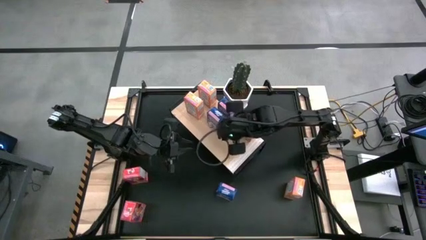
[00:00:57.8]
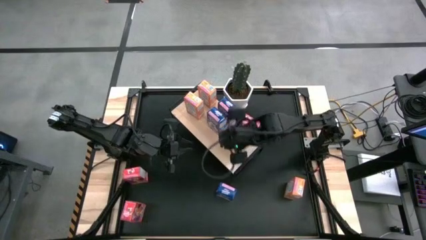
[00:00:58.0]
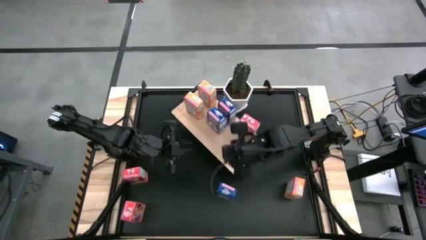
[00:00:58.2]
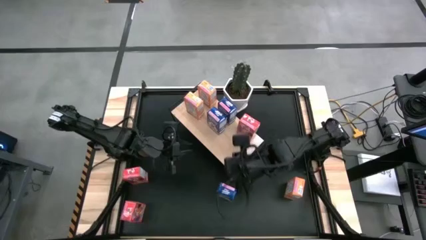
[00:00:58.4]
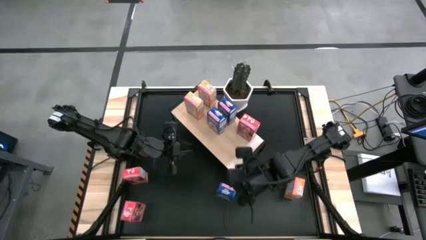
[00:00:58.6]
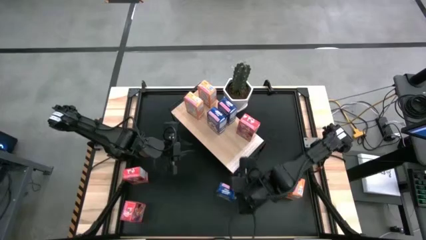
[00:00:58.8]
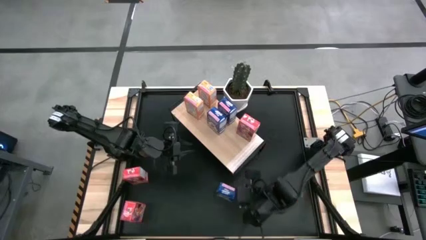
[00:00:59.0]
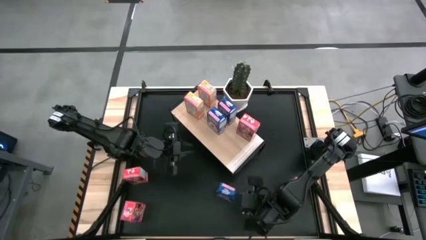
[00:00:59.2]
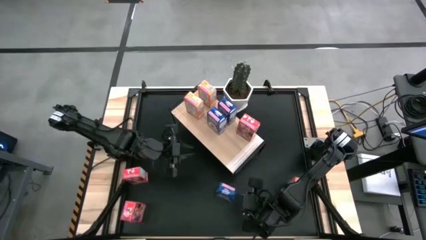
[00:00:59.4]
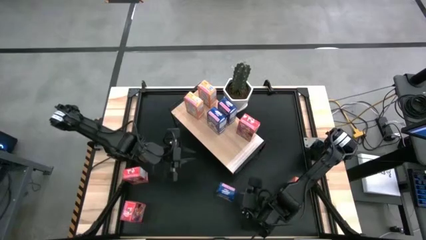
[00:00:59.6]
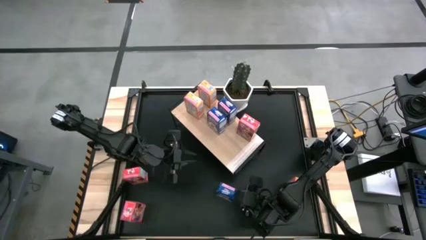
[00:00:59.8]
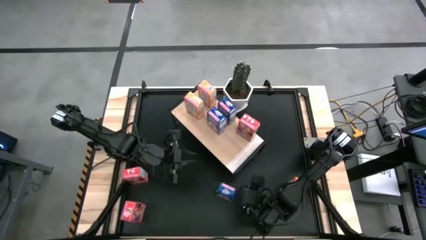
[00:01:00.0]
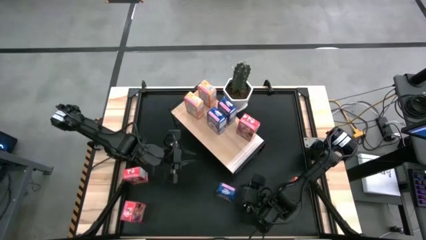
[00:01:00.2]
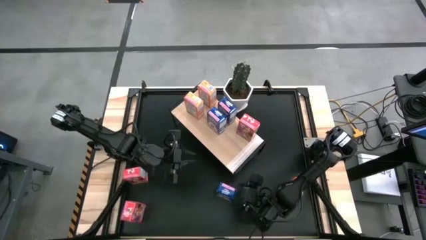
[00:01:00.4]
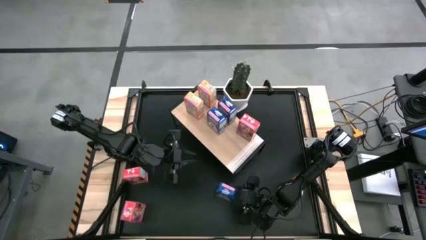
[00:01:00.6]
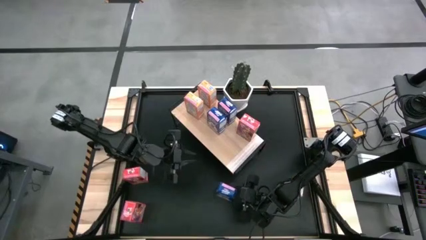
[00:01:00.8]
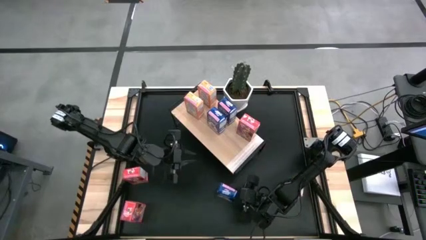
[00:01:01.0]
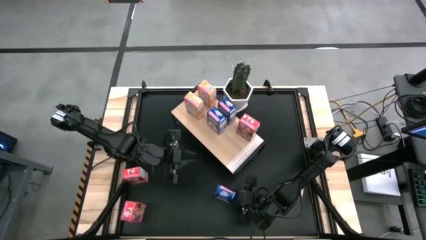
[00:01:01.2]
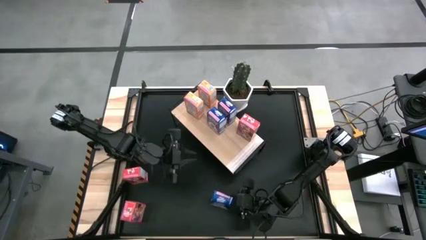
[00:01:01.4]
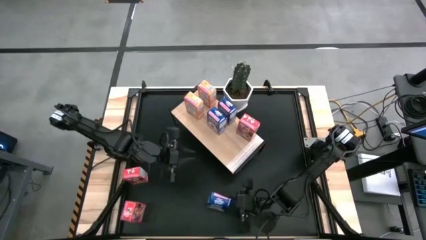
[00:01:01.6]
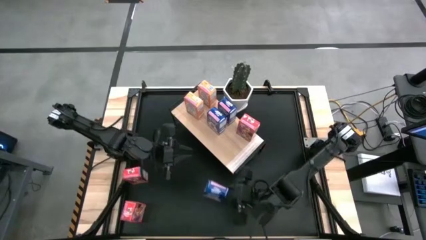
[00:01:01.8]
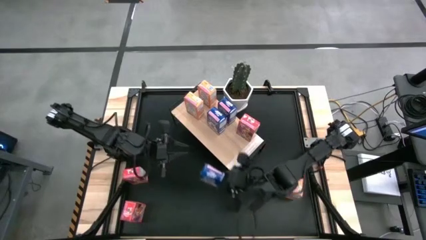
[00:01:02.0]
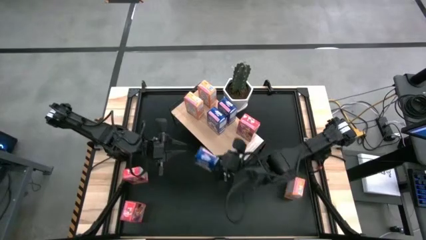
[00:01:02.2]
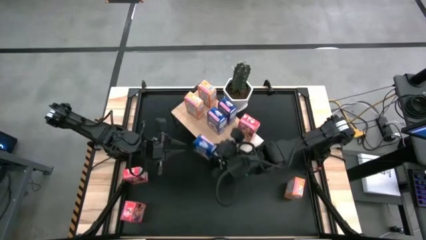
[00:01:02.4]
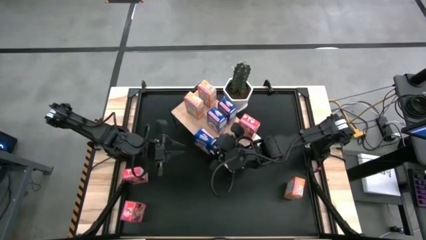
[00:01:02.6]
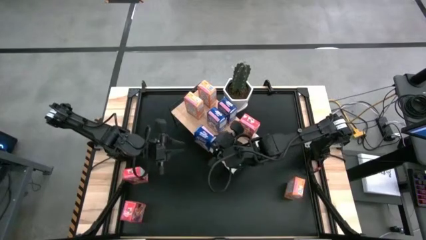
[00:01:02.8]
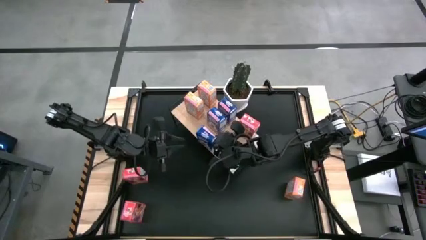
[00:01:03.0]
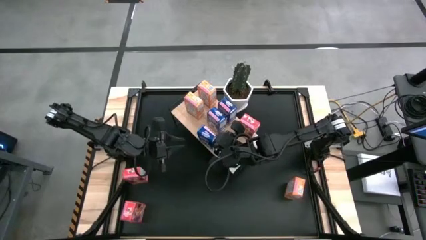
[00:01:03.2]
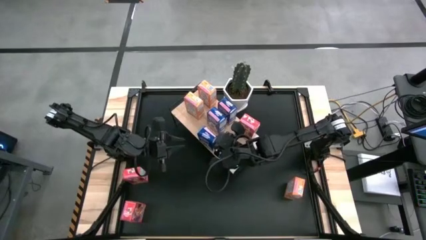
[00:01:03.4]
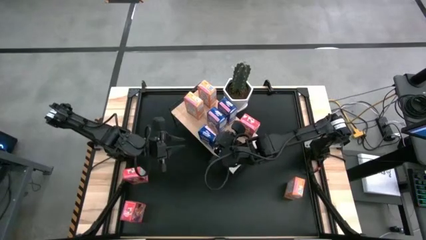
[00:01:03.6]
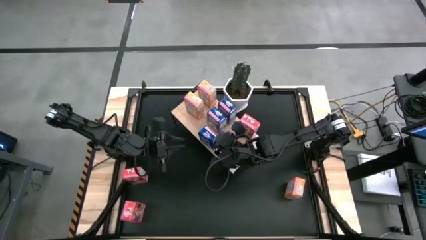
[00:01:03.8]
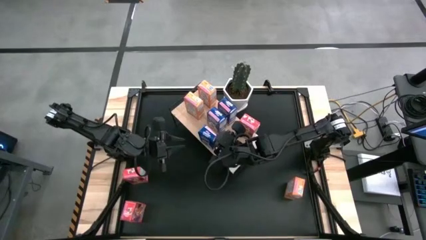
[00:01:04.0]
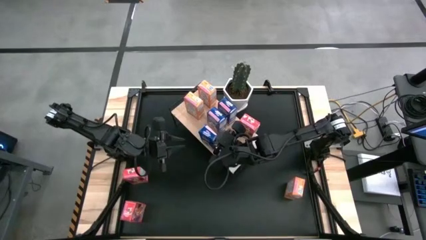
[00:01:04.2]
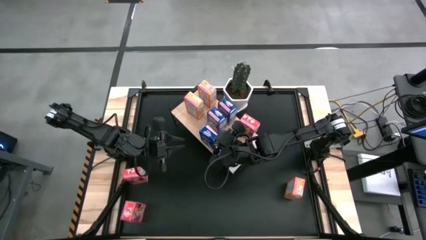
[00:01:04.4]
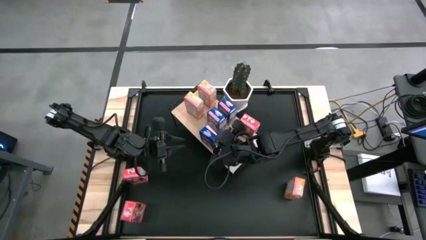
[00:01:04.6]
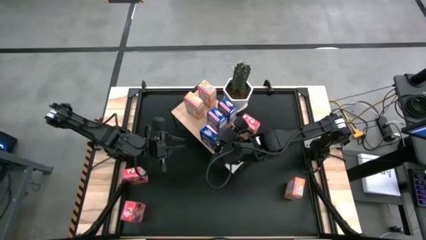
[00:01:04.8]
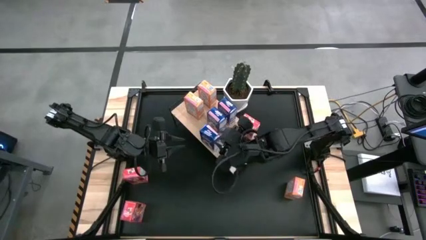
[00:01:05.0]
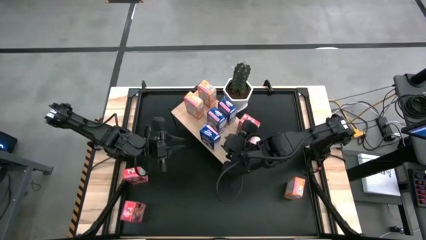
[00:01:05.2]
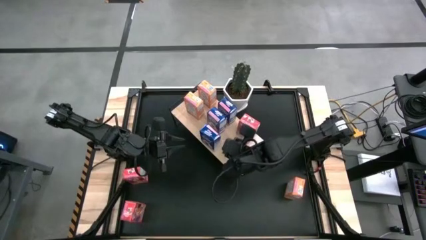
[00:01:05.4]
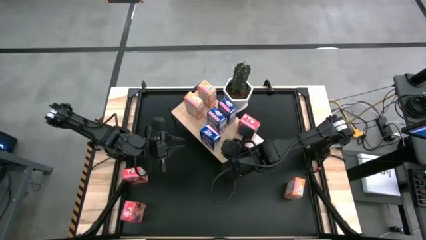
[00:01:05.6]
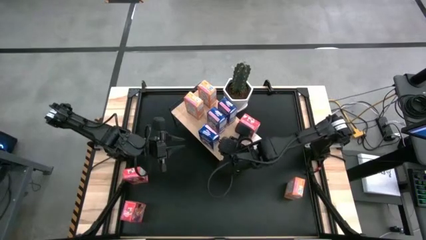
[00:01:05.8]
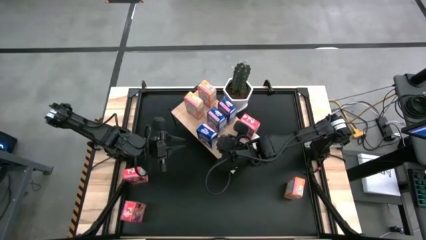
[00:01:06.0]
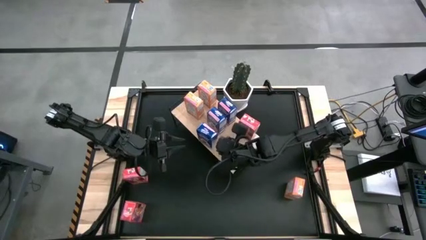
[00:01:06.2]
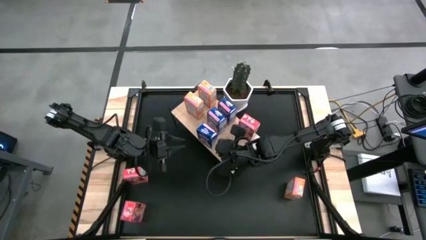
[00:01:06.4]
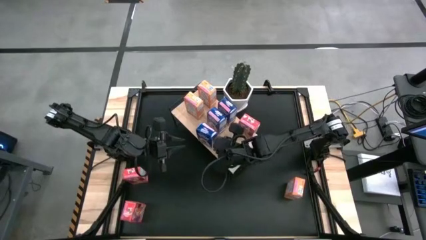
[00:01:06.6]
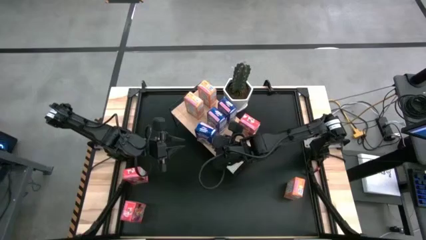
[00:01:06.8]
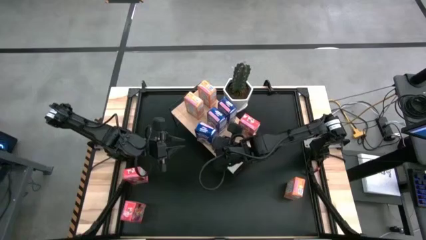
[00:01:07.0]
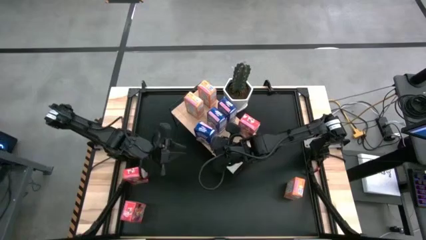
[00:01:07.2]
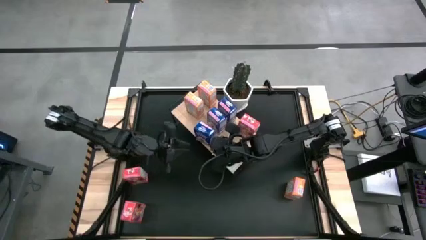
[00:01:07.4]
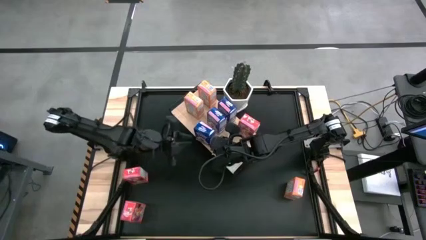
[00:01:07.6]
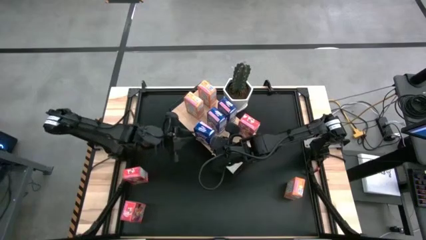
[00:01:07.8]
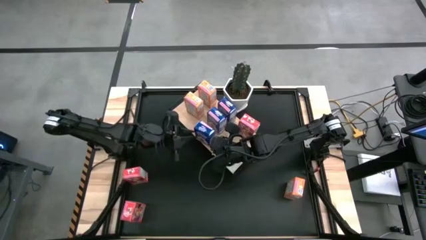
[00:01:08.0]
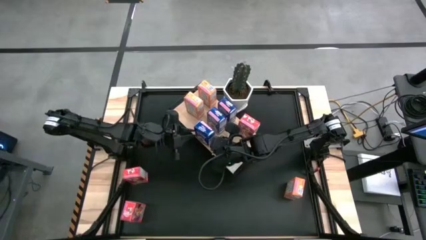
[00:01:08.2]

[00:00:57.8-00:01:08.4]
Task: Stack cereal on shelf
Put the blue cereal box on the shelf aligned with the other blue cereal boxes

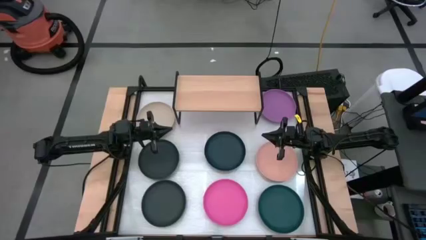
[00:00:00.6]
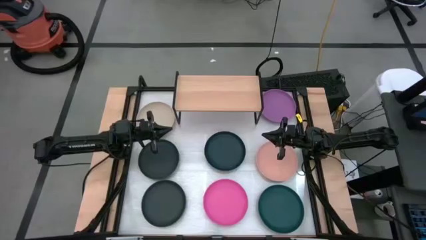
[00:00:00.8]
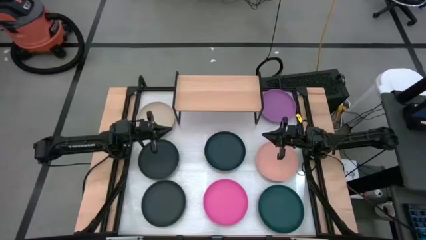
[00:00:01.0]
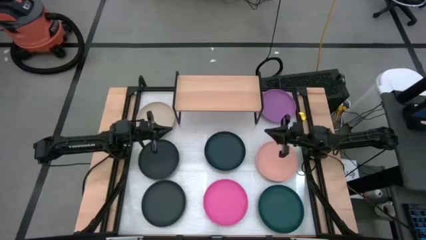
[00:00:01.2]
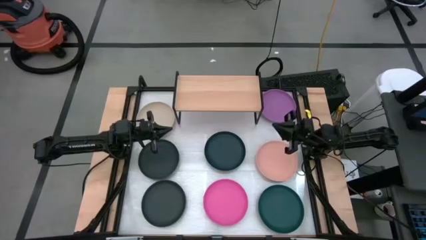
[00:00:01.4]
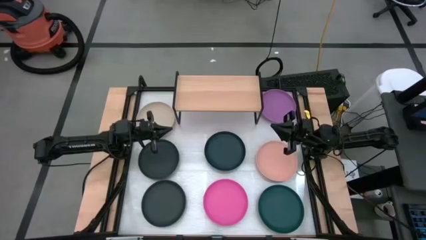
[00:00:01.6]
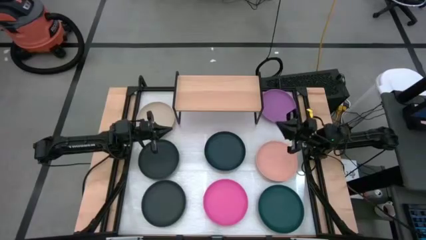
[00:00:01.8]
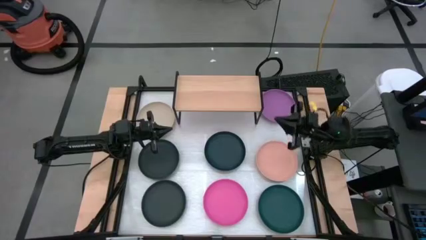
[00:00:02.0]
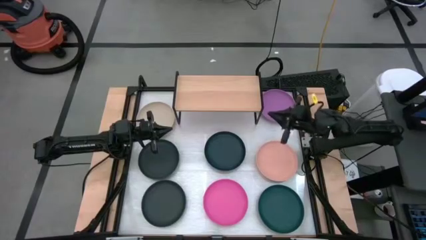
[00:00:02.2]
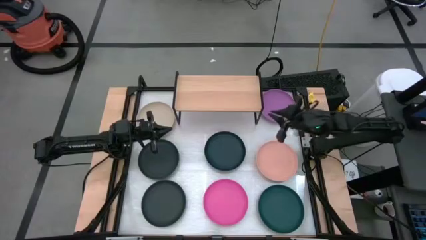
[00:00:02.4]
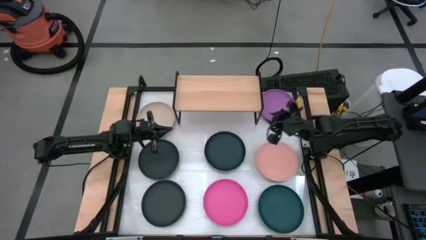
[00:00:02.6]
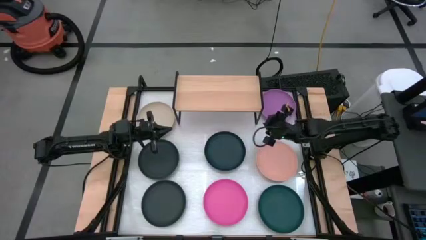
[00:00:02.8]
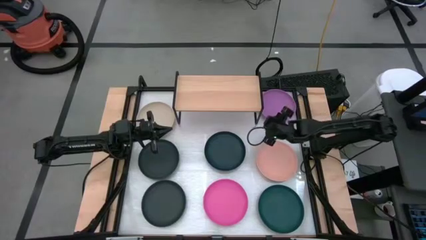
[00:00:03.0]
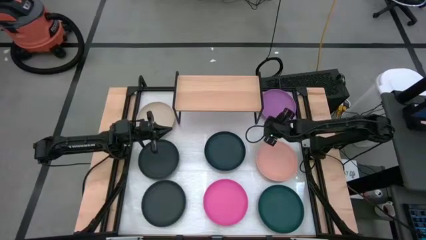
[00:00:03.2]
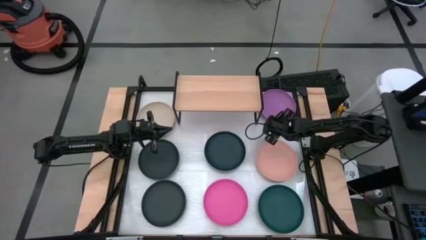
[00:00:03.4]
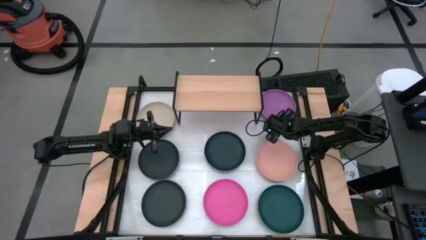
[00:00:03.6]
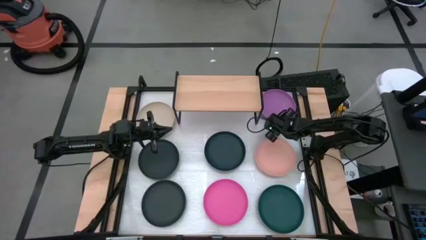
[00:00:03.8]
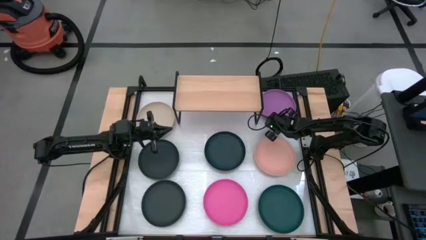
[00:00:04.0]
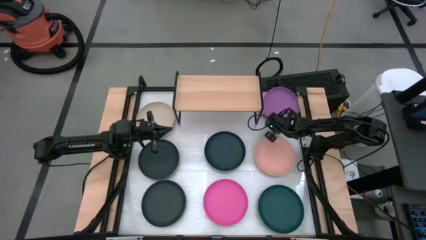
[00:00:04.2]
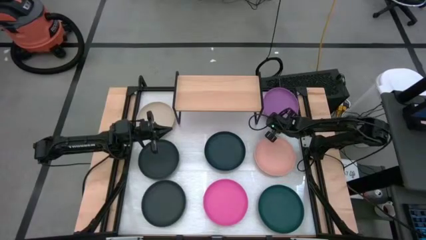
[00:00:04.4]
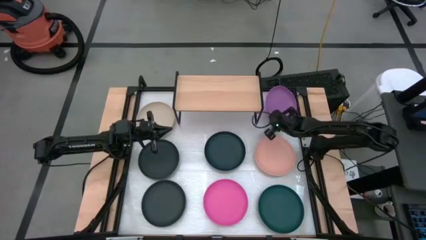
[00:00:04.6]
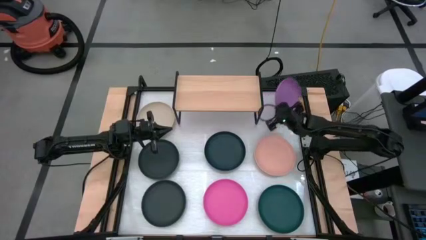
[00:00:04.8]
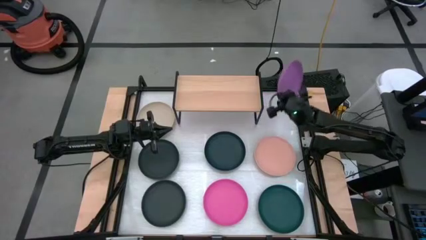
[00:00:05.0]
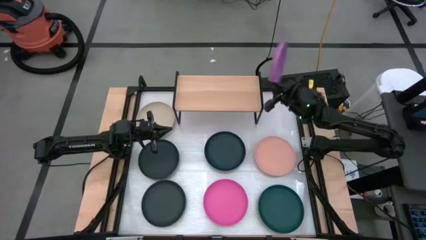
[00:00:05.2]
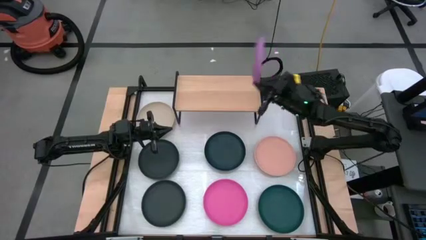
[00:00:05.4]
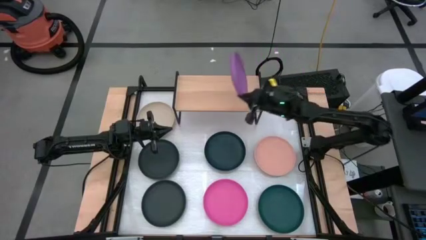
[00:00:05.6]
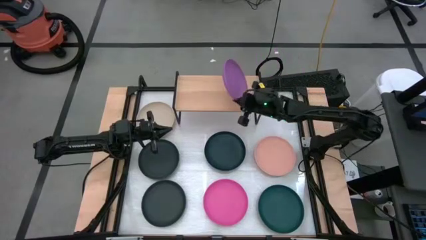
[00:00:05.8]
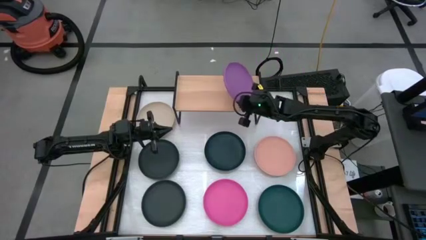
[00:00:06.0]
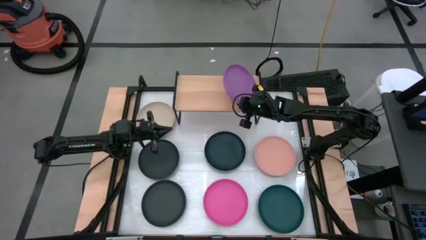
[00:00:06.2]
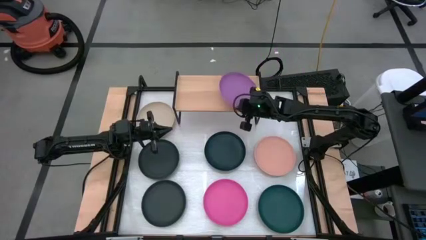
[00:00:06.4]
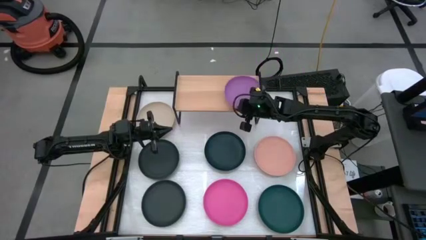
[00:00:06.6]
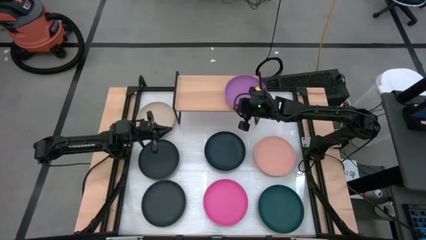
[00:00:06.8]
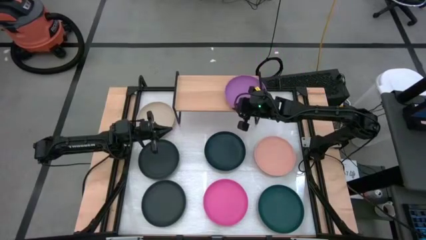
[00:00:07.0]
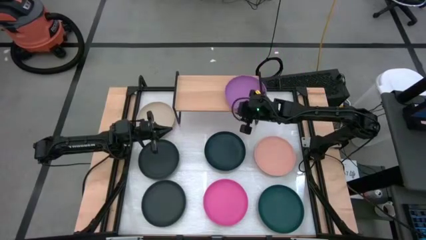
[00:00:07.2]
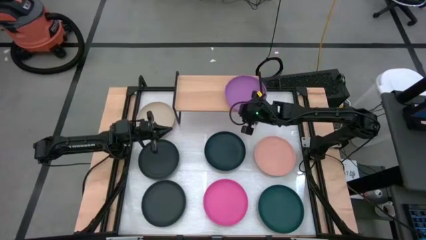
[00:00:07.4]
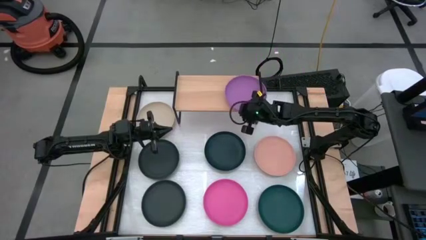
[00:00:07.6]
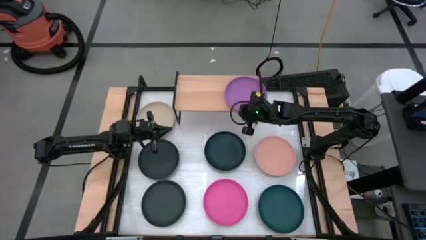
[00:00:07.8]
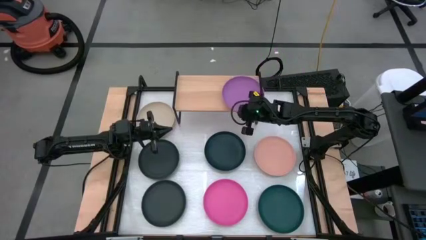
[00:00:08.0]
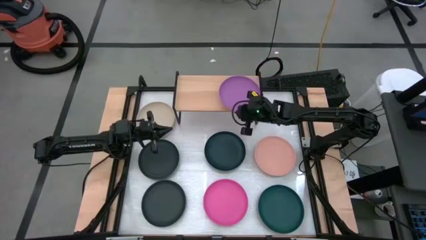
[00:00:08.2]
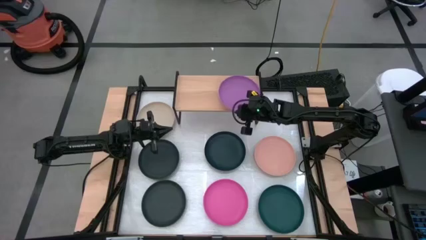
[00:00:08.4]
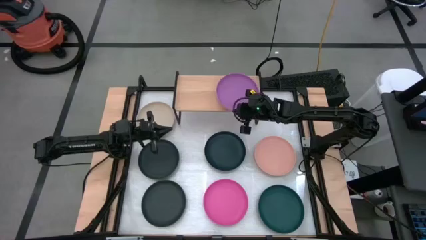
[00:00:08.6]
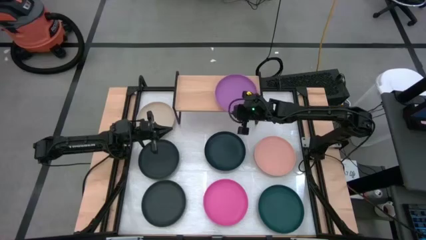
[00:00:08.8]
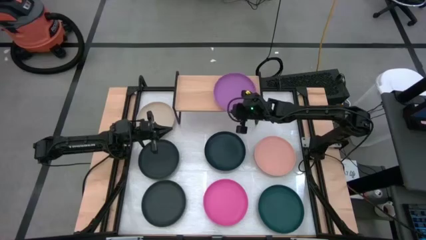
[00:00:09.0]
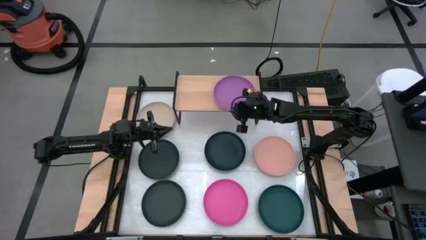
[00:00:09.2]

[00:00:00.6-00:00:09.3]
Task: Place and stack plates onto a shelf
Put the purple plate on the shelf
